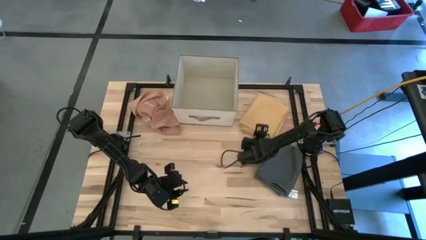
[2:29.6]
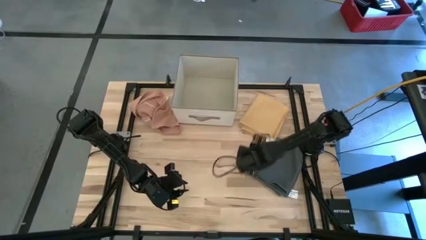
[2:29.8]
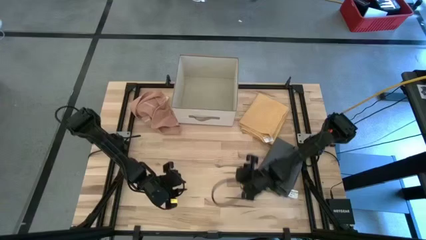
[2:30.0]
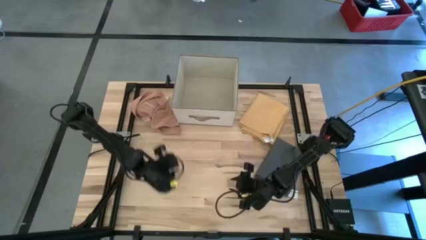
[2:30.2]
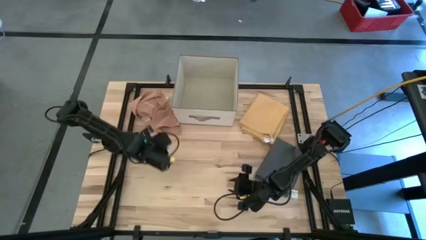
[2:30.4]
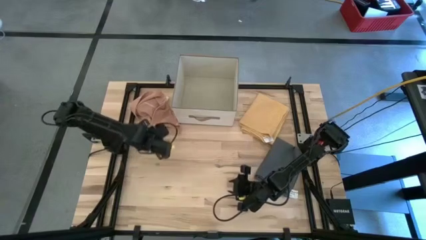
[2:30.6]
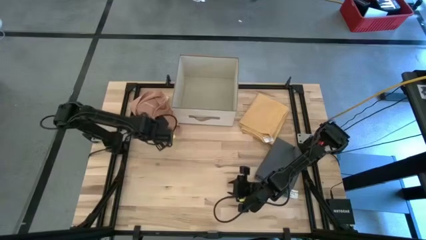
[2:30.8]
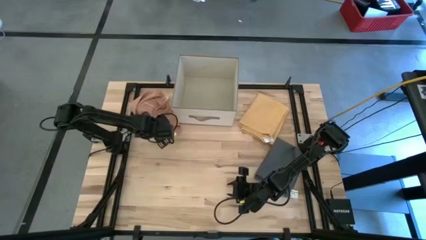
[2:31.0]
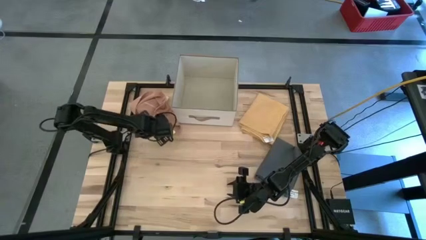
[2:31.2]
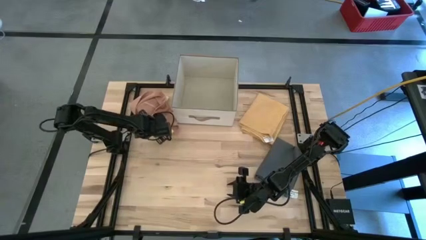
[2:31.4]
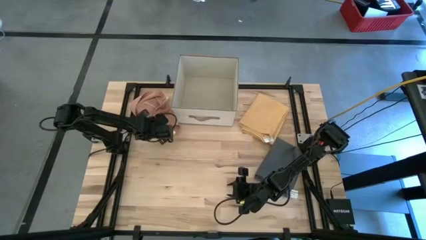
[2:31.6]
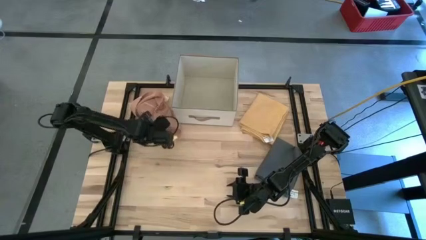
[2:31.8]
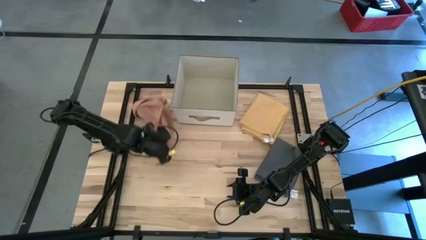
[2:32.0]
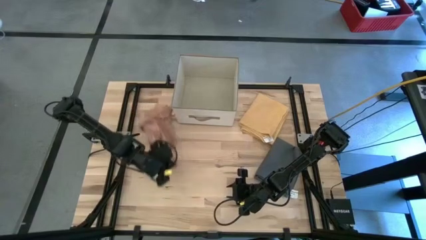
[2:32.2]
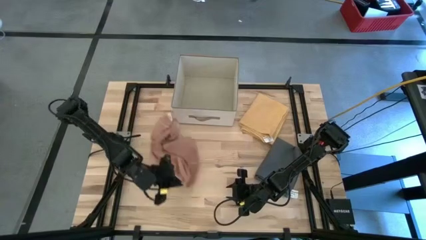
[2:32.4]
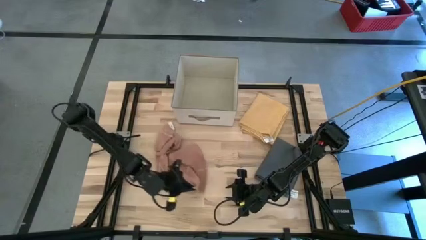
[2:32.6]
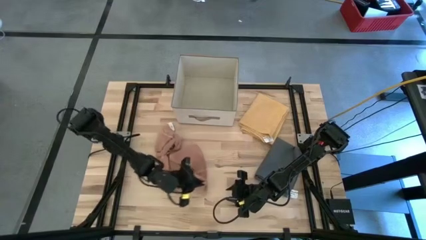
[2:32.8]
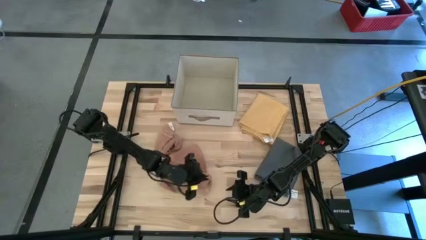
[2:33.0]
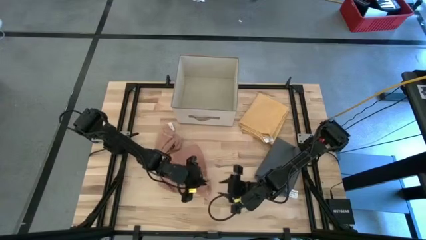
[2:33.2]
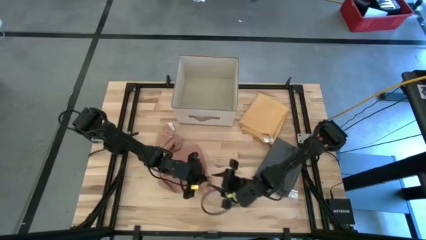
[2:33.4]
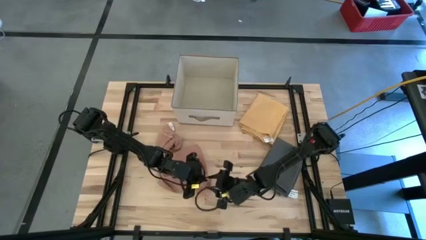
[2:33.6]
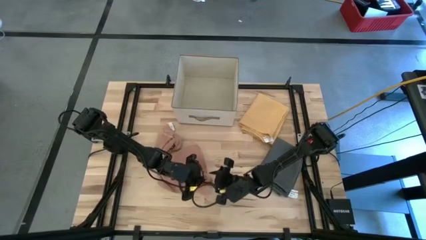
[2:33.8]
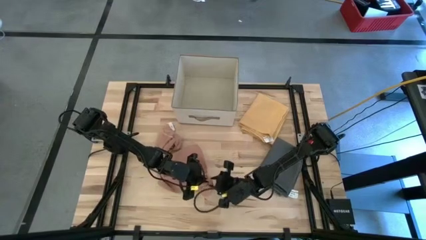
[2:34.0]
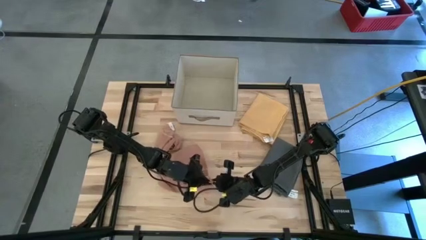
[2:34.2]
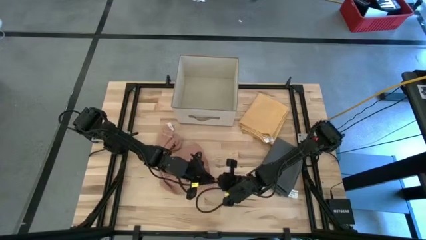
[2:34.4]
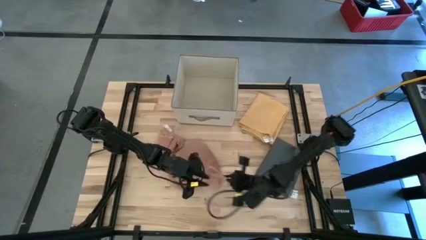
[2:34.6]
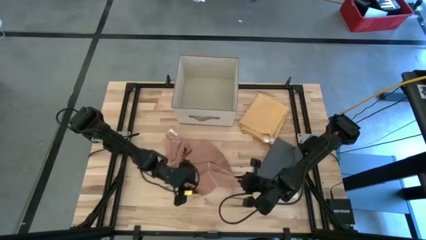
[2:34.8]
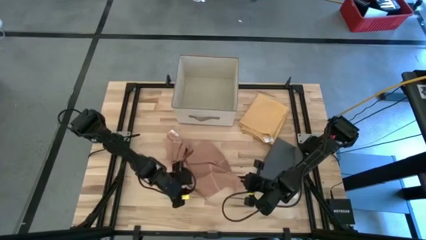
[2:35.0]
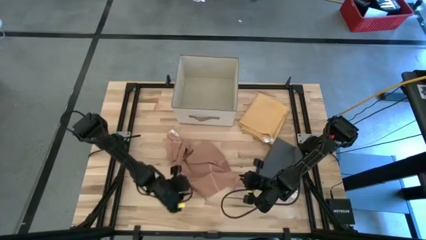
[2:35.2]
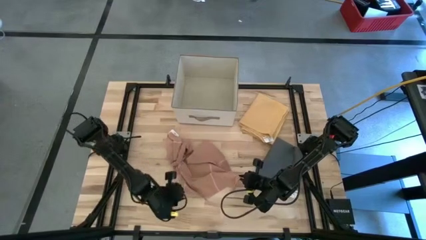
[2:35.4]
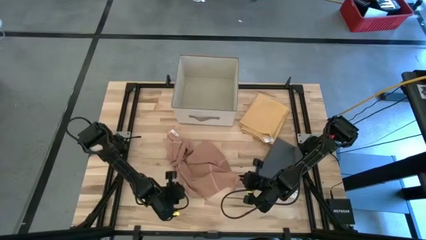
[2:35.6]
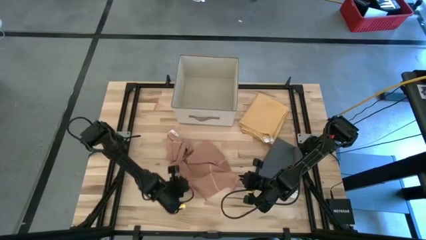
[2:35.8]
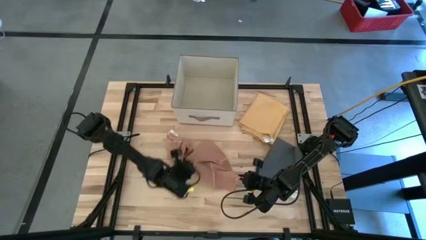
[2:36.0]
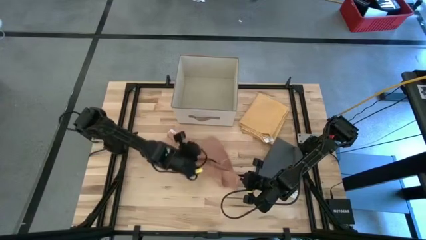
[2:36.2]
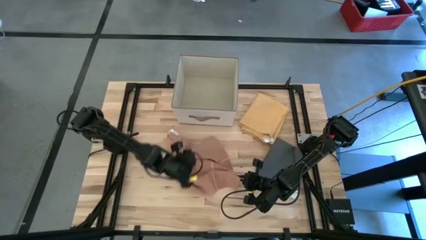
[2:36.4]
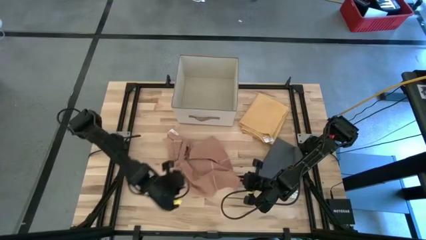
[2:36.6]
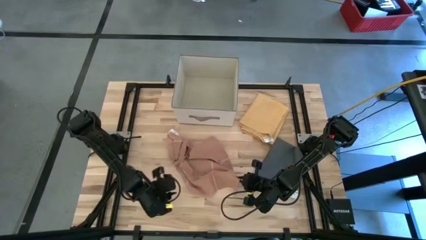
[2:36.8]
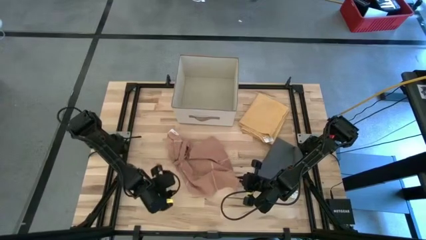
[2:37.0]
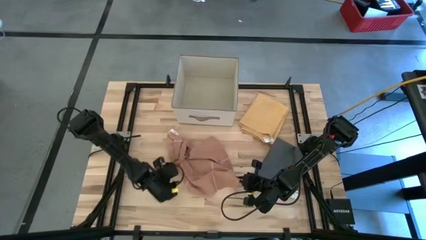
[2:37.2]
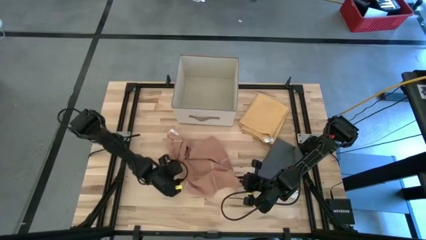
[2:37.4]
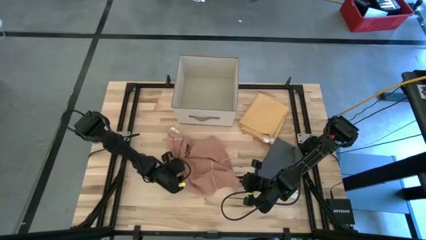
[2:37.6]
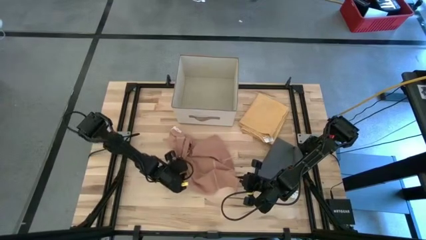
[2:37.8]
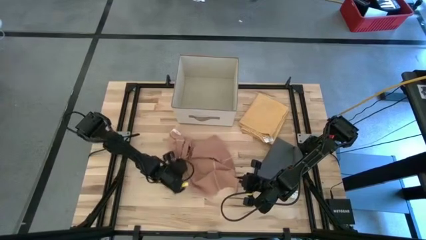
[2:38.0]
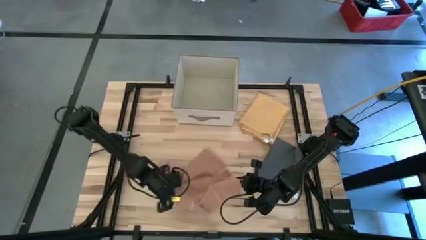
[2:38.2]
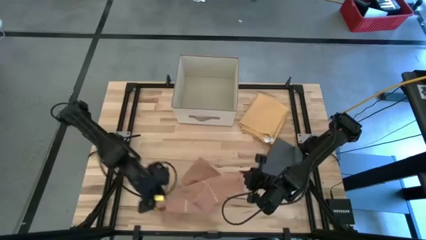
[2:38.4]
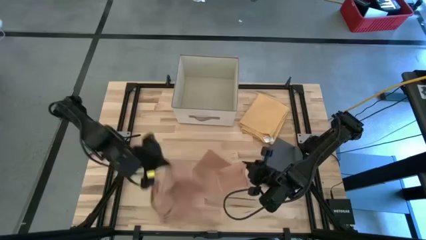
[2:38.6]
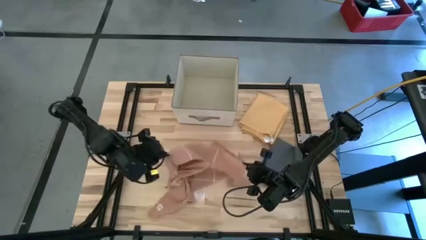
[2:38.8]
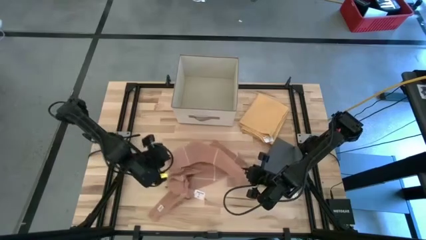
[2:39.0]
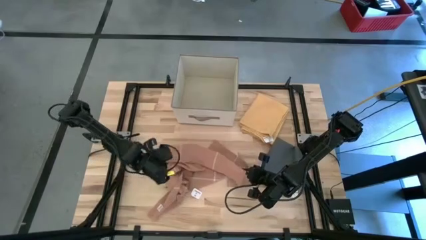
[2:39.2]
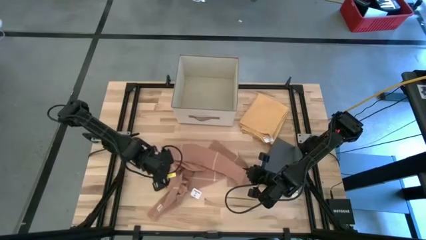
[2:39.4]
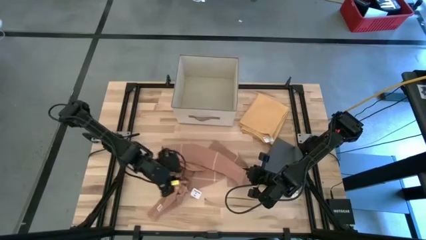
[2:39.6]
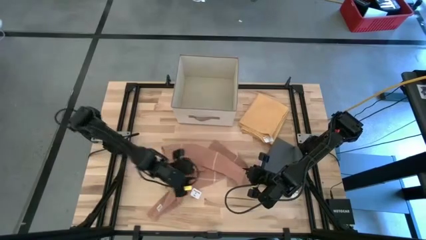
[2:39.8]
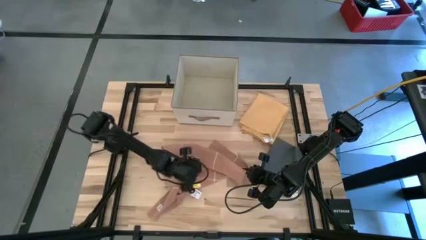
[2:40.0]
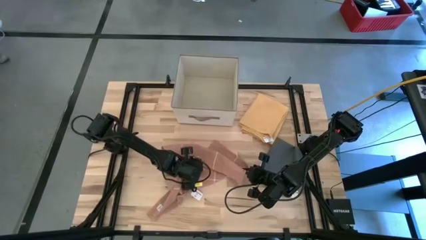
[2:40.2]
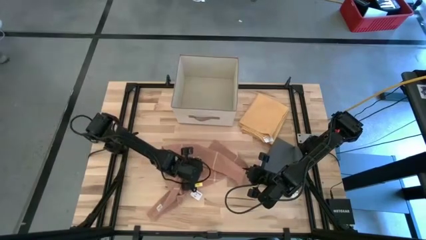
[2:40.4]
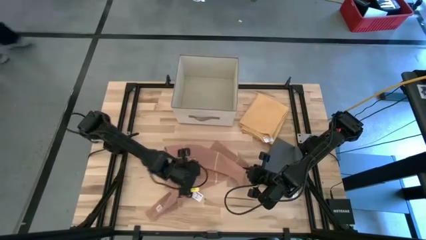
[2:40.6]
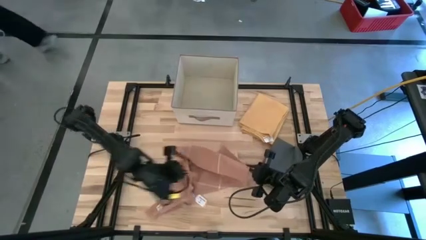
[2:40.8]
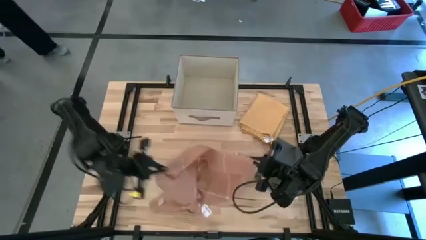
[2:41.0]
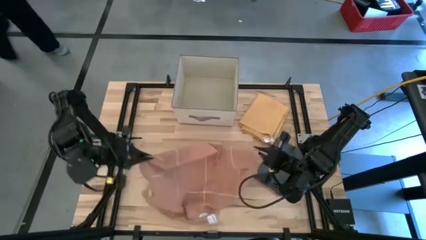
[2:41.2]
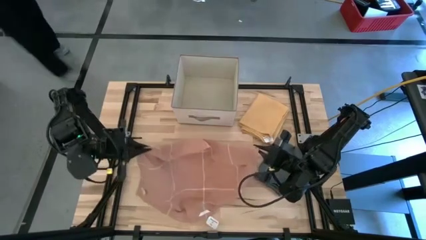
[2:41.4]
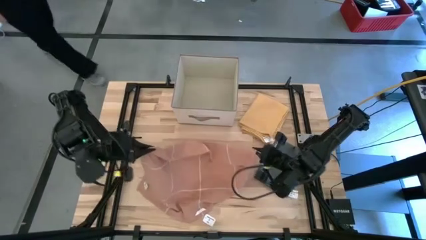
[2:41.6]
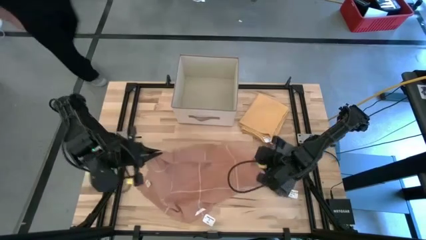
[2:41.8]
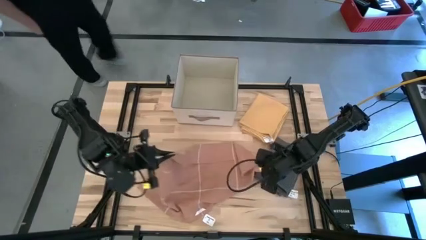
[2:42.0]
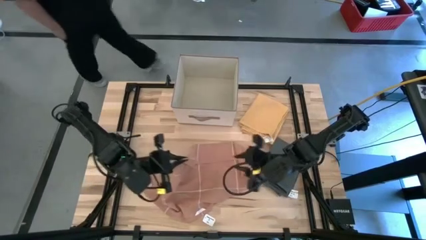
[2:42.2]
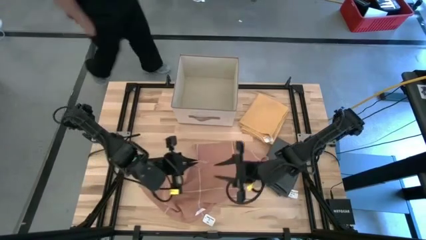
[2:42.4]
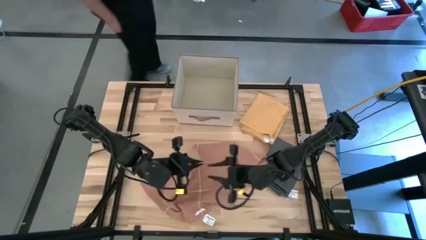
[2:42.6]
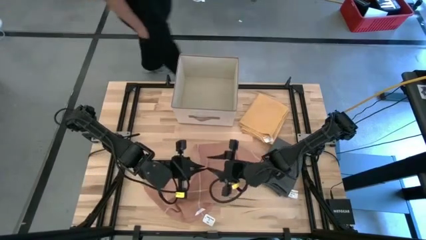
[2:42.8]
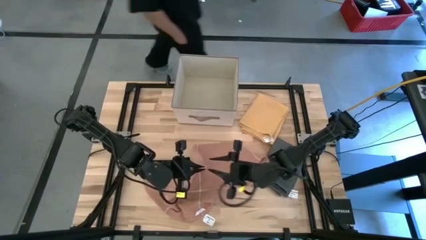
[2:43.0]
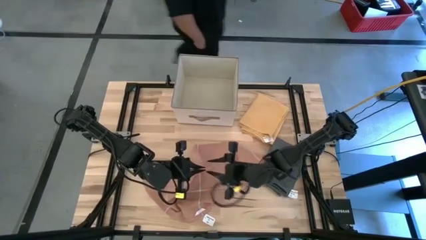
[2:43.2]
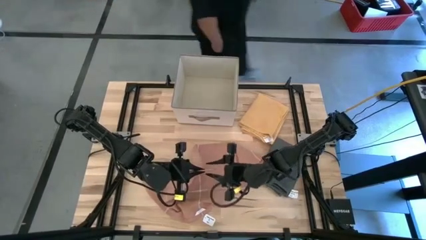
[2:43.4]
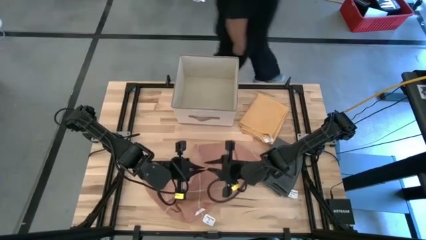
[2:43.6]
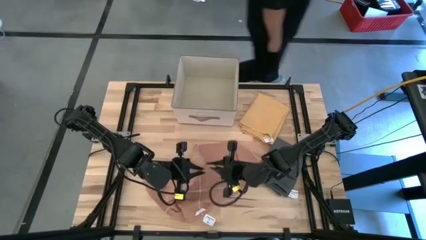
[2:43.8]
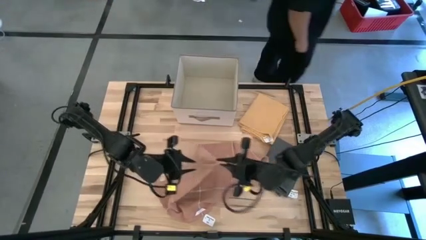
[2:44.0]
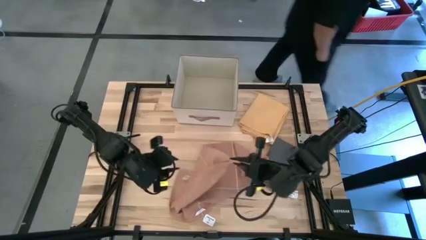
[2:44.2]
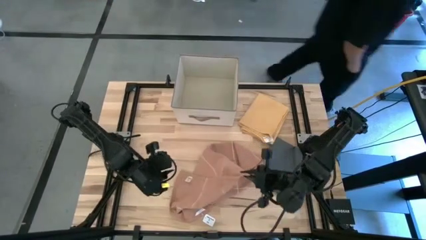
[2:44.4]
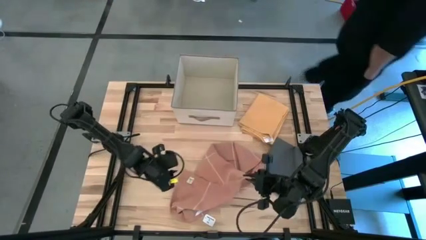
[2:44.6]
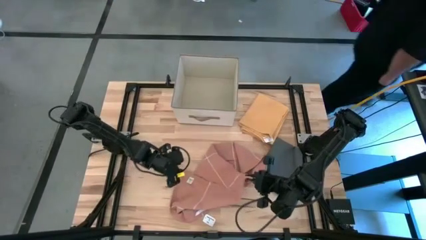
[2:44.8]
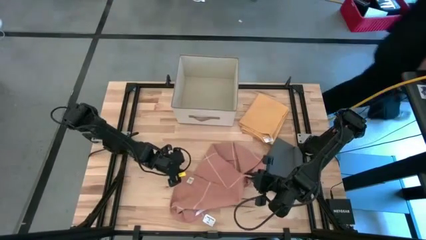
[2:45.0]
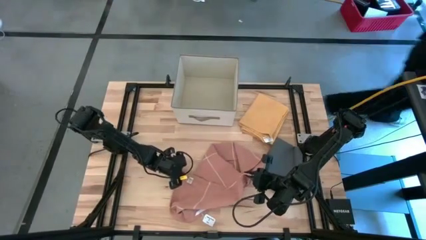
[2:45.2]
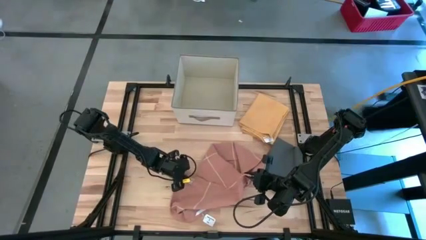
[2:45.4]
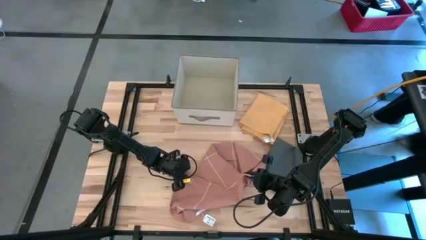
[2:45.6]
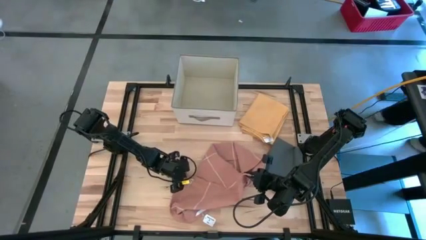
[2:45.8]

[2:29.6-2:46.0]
Task: Fold towel
Fold the brown towel
